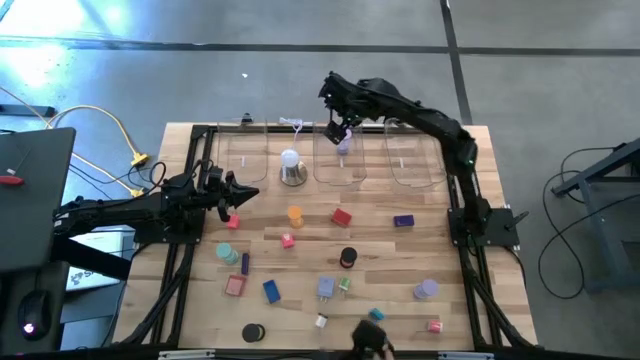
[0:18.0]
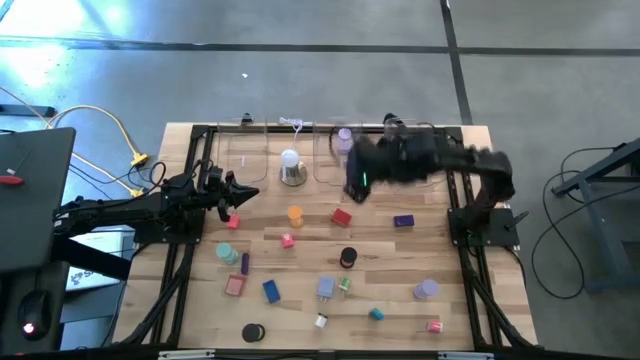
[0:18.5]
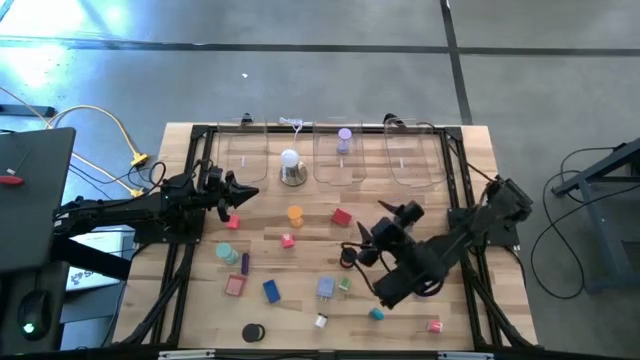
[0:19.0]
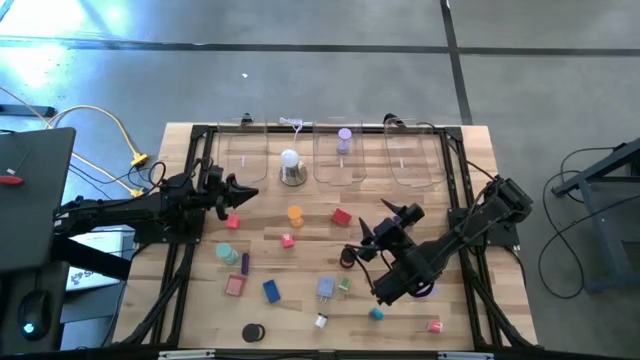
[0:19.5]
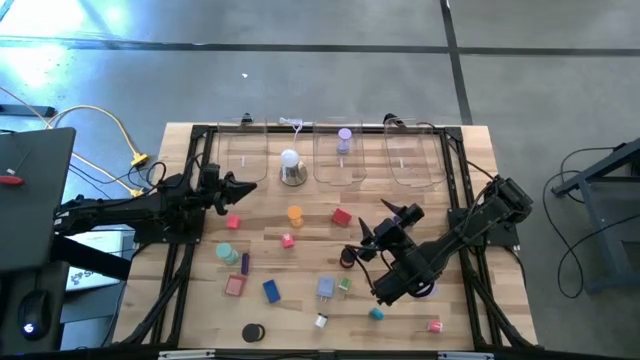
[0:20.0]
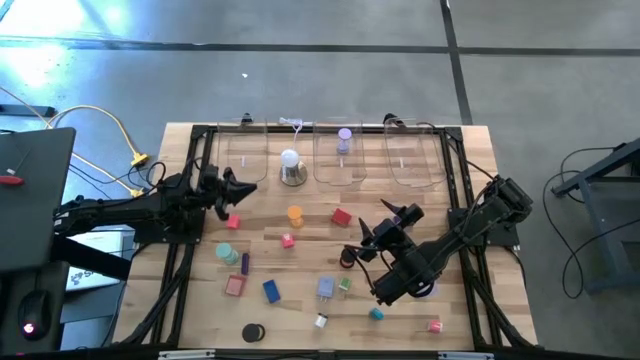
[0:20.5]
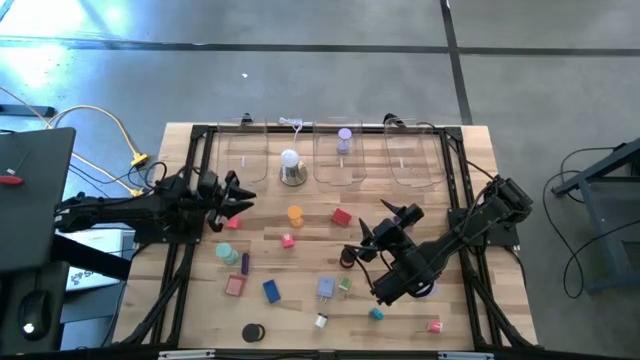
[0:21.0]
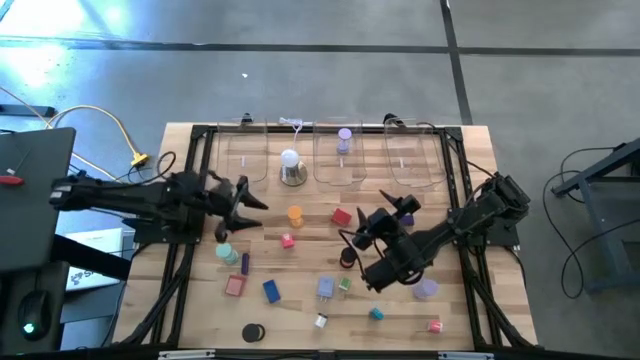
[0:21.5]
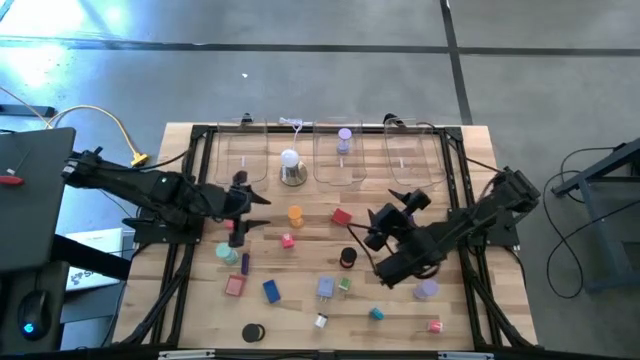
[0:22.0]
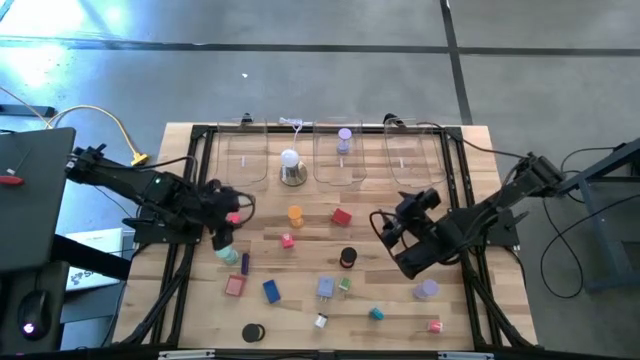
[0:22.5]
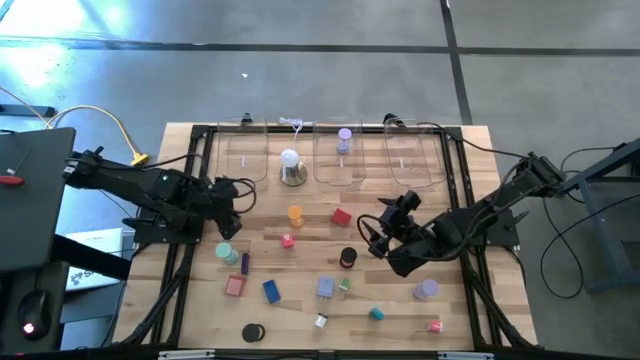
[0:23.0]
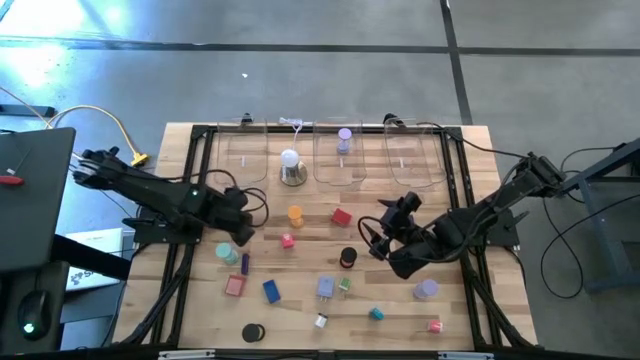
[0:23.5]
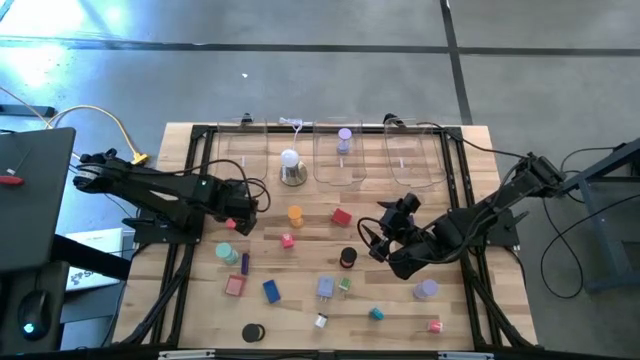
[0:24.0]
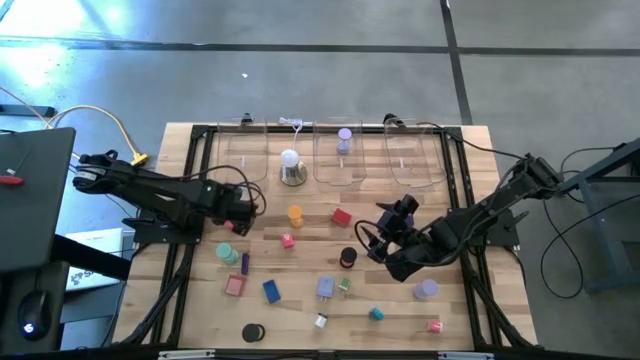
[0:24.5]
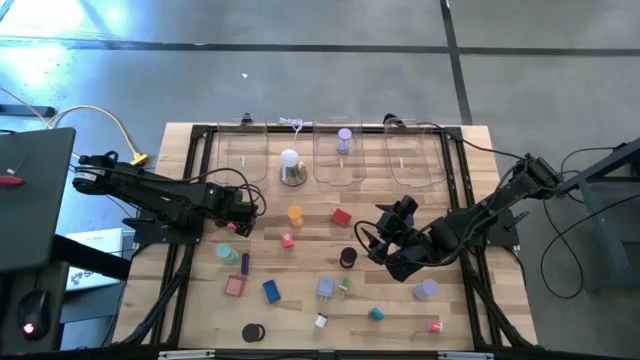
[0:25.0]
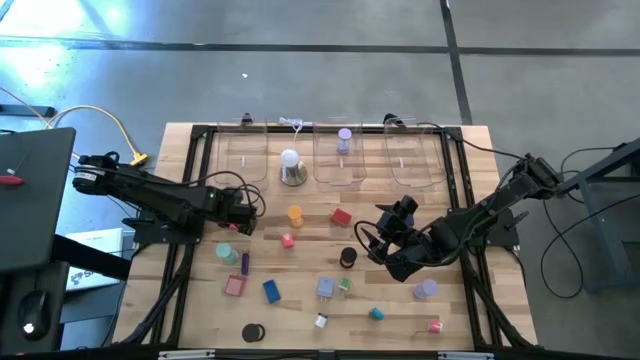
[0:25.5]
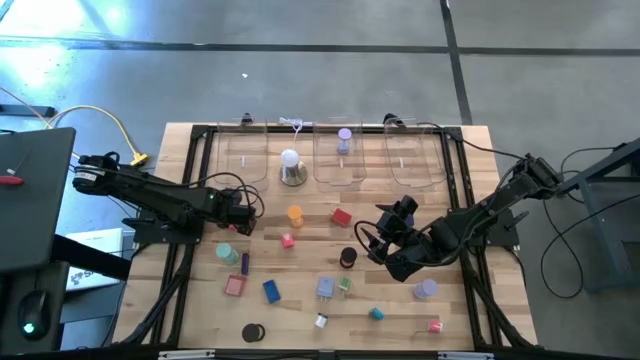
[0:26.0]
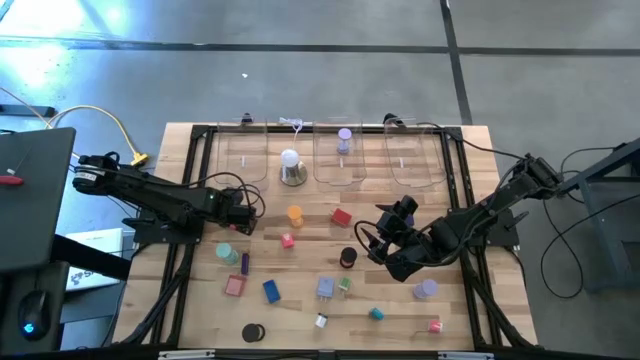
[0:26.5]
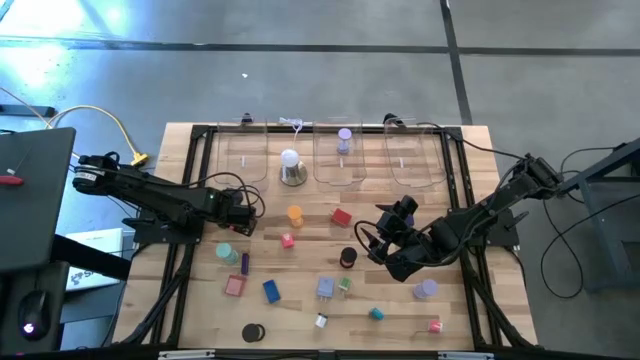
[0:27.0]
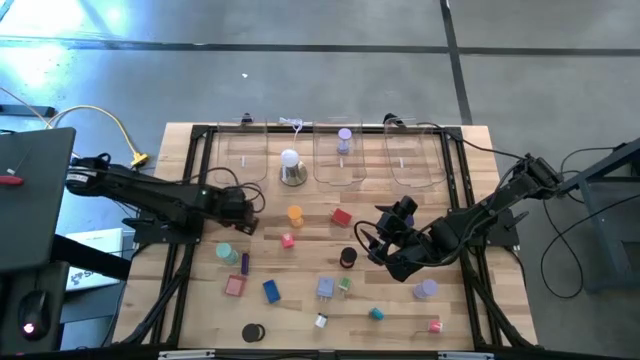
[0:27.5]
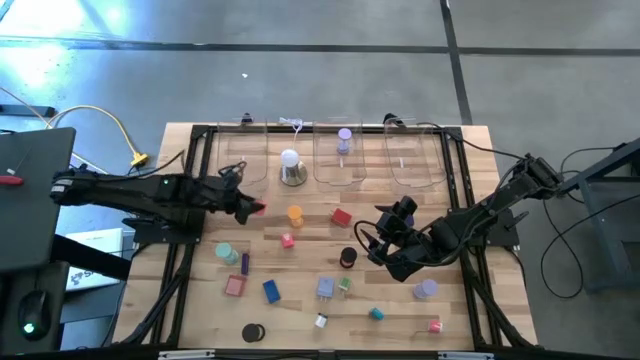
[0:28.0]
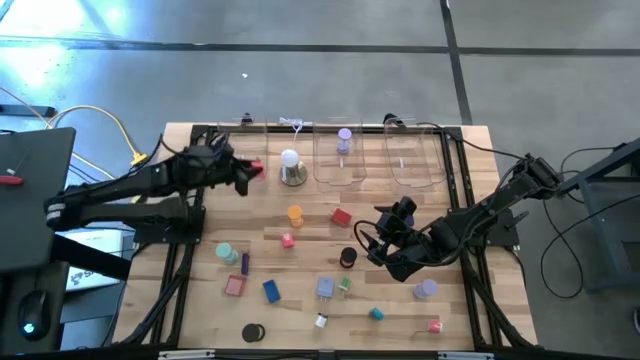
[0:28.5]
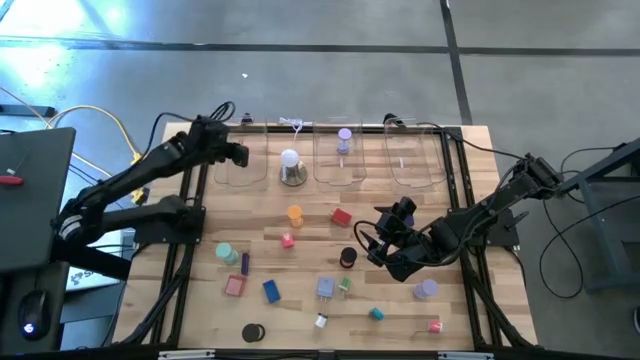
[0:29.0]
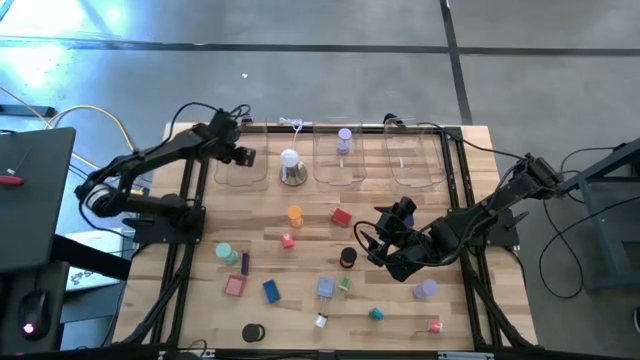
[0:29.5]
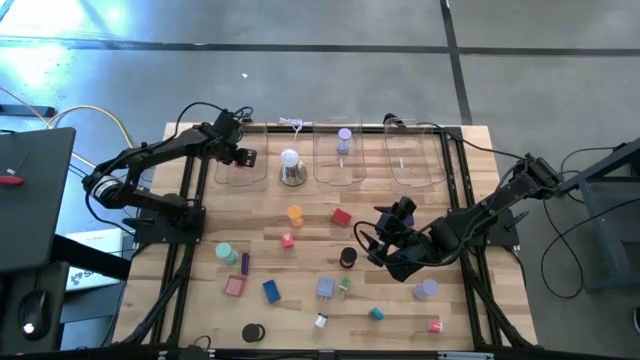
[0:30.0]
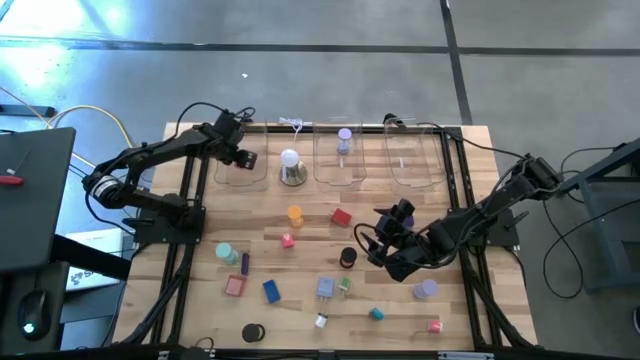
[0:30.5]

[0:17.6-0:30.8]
Task: Pick & Place Office items
Put the left pink charger adapter into the left transparent bin

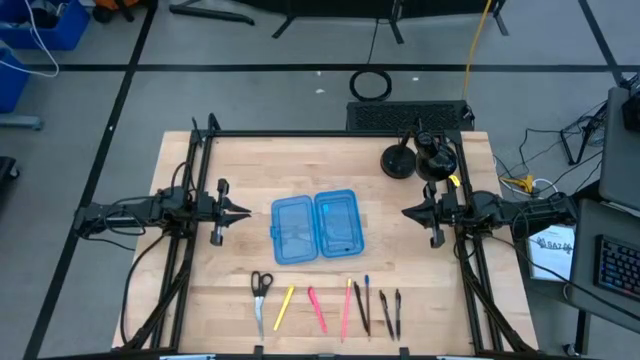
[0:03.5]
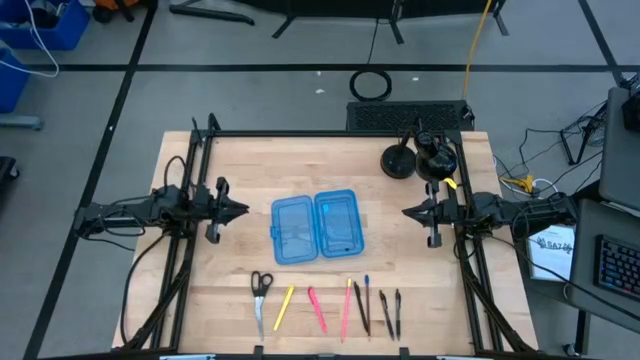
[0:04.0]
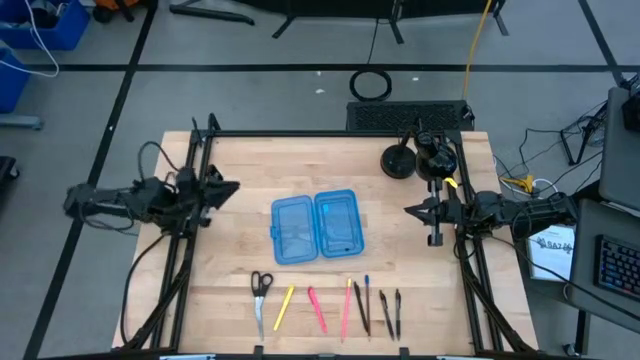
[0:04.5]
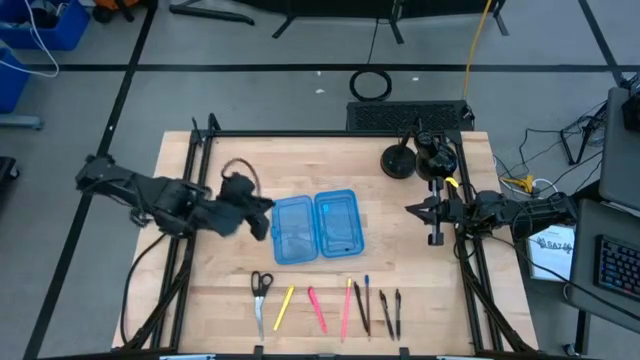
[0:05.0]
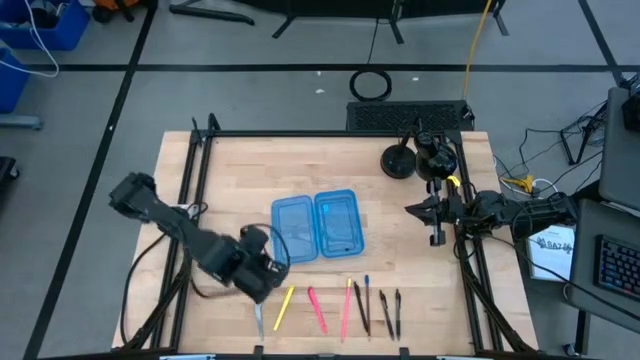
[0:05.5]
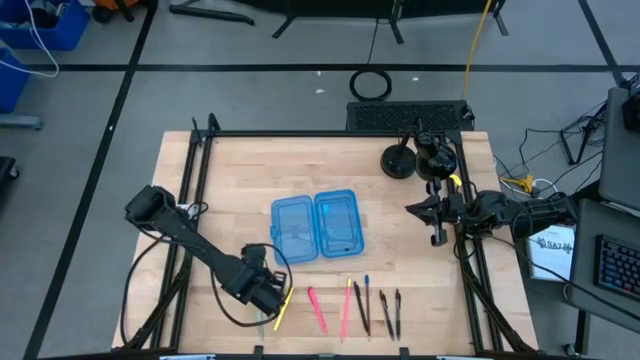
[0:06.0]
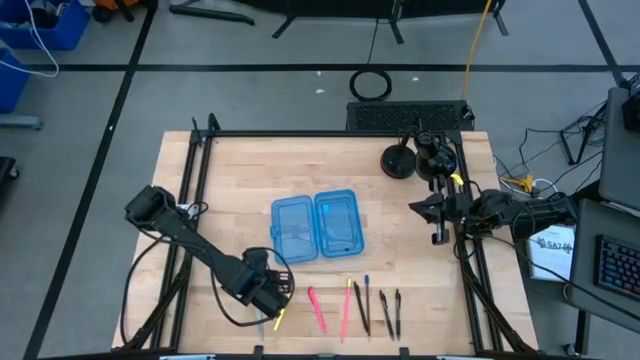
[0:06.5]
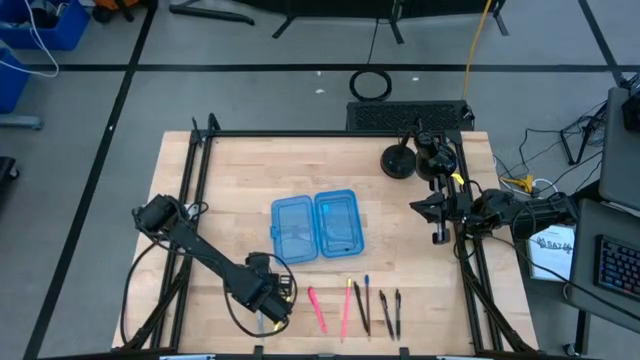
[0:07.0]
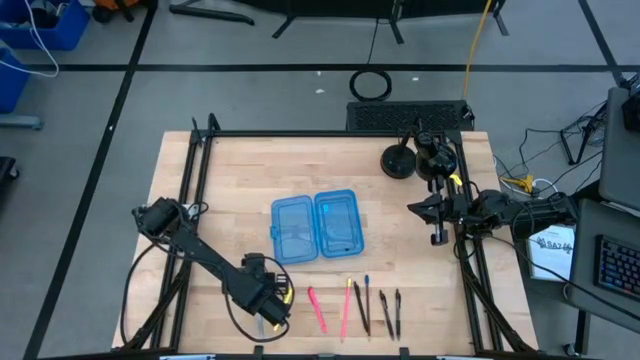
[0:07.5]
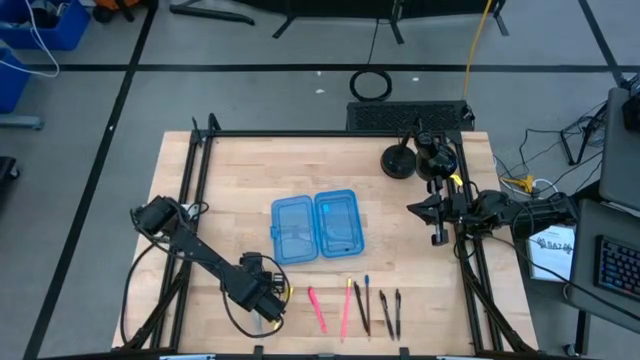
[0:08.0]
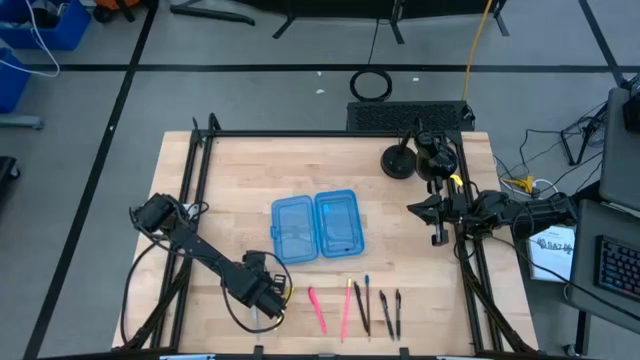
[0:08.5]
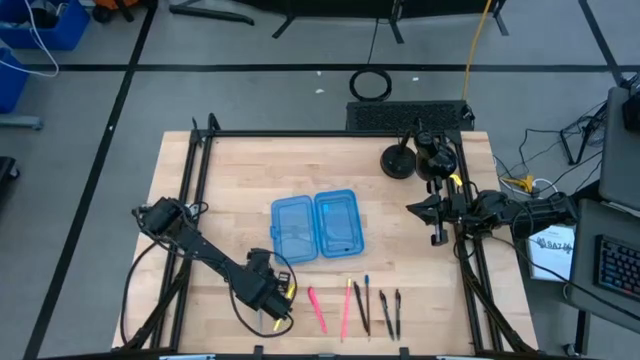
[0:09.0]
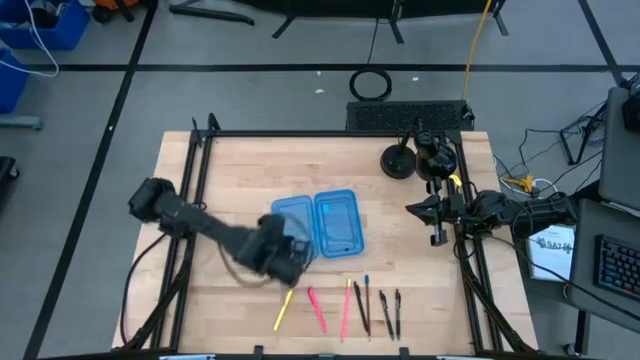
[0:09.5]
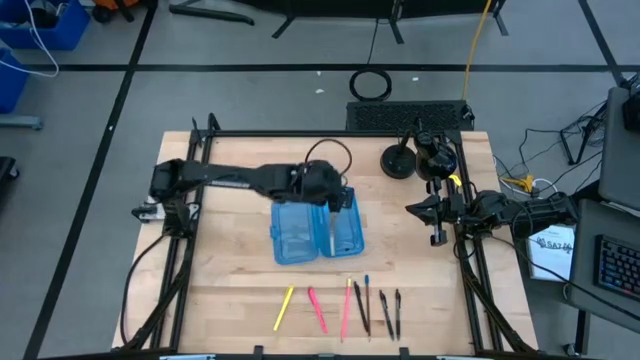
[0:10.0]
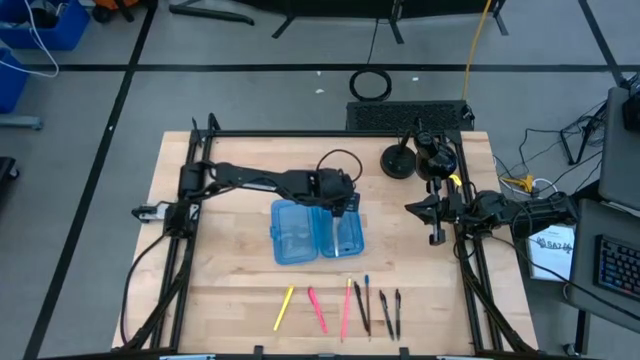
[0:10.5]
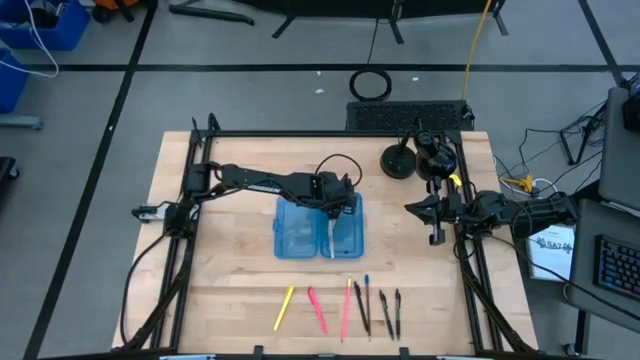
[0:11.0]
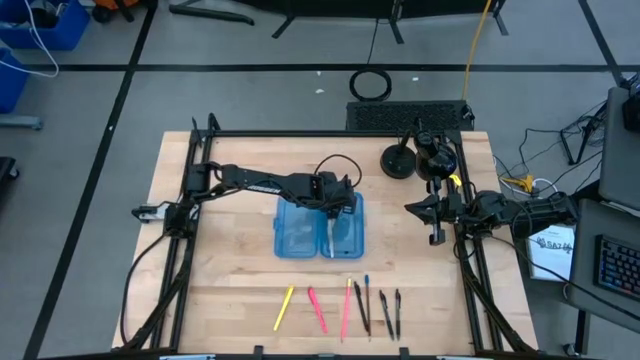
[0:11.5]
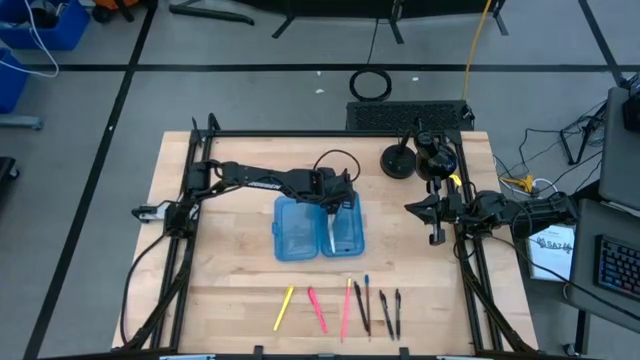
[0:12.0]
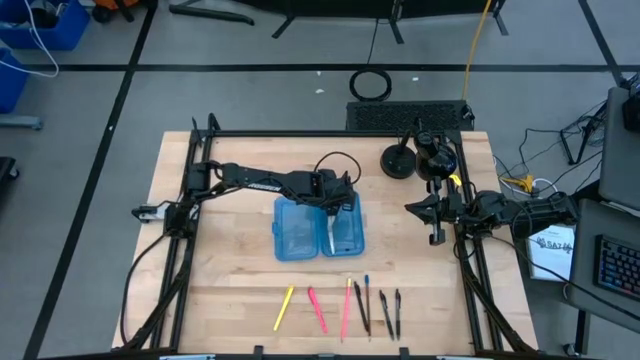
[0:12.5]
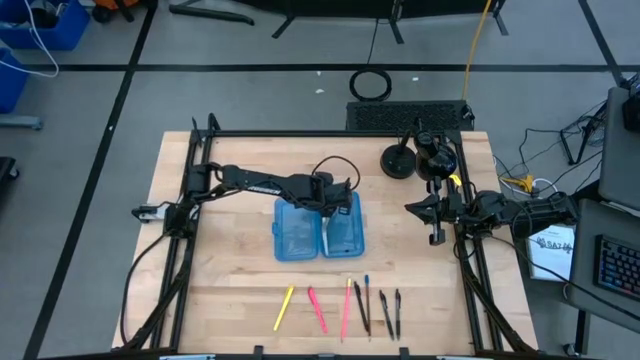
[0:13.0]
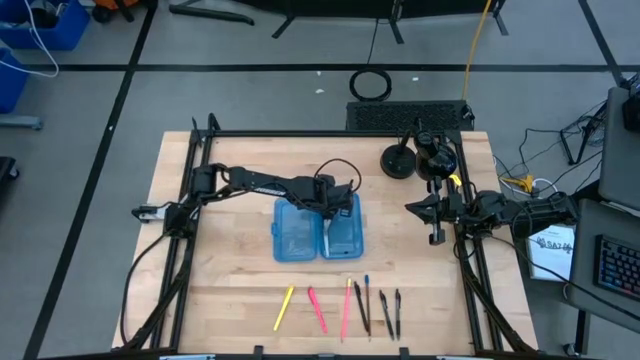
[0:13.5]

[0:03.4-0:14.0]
Task: Pick & place school supplies into a supply box
Put the black scissors into the blue supply box
